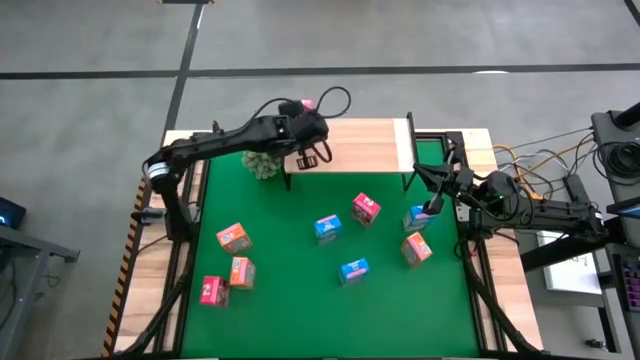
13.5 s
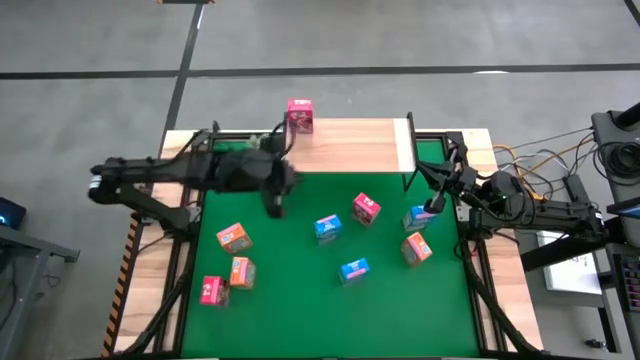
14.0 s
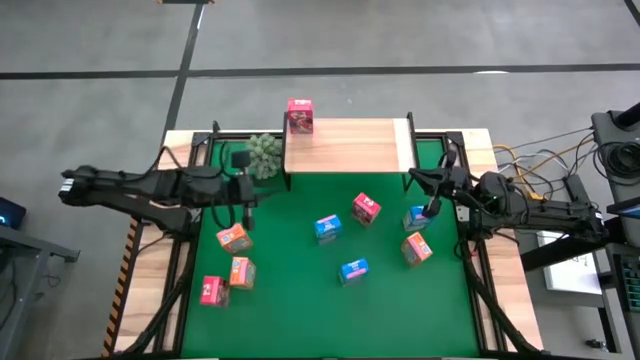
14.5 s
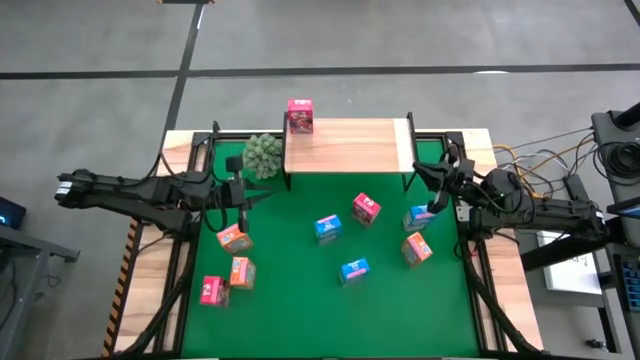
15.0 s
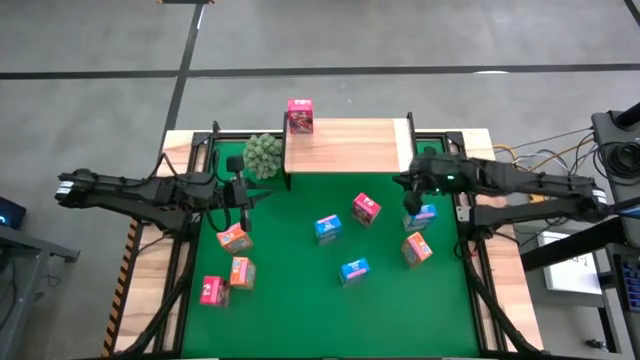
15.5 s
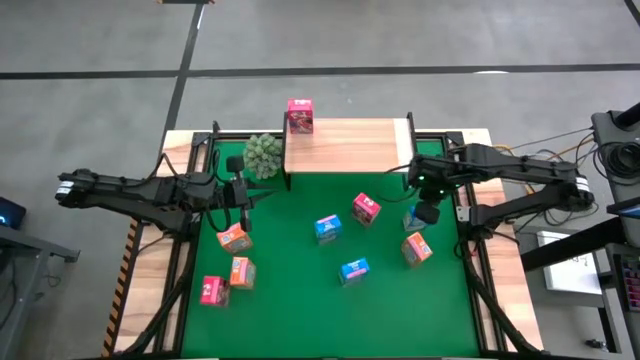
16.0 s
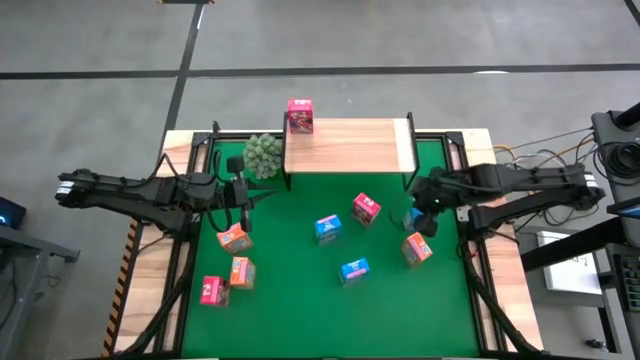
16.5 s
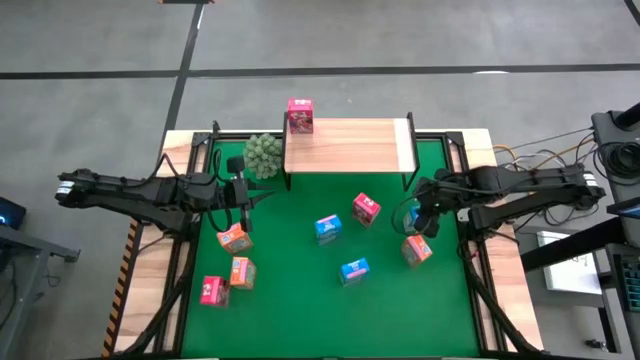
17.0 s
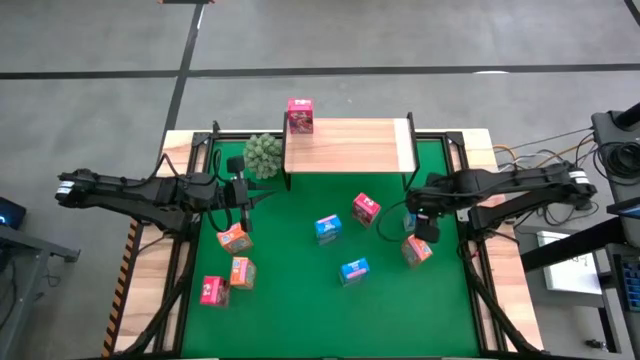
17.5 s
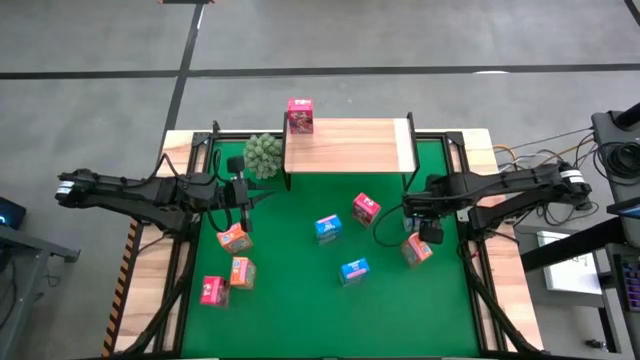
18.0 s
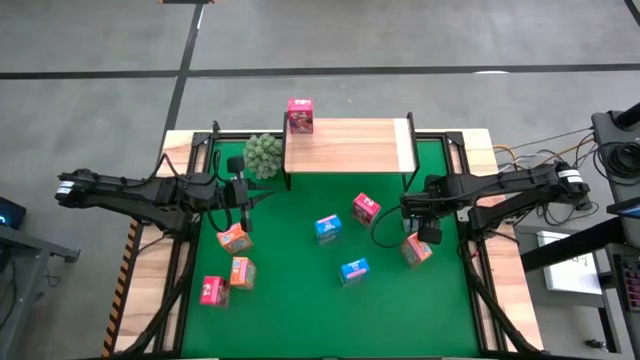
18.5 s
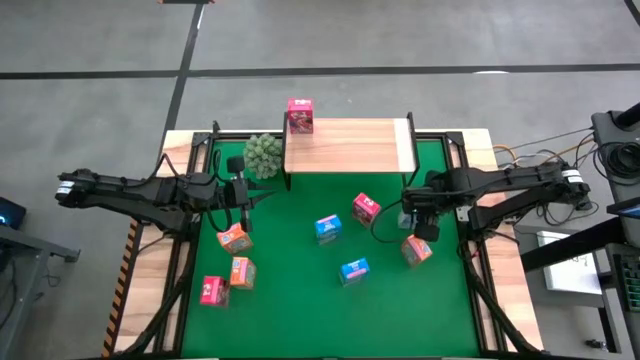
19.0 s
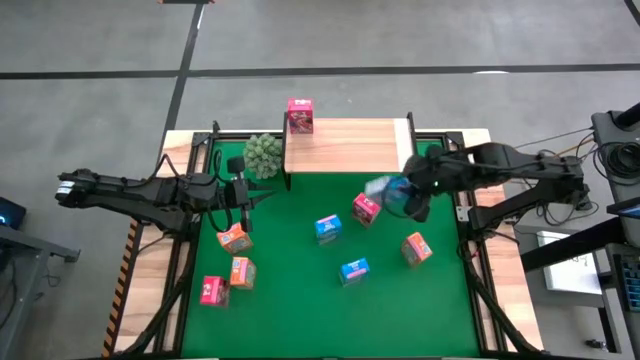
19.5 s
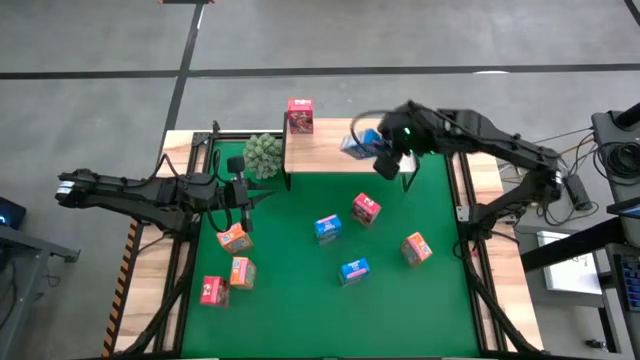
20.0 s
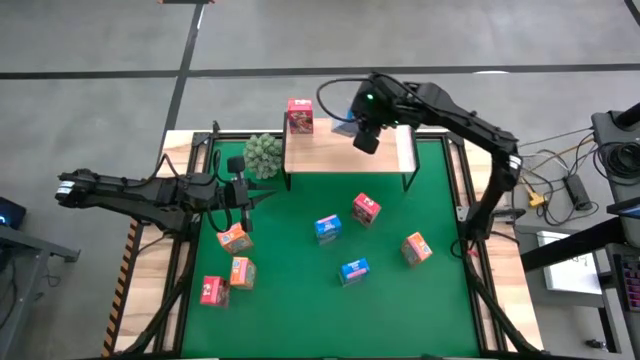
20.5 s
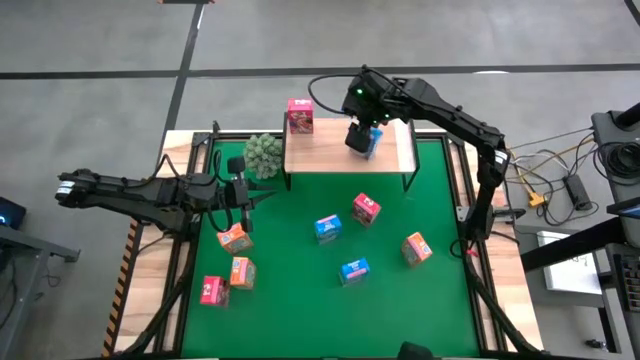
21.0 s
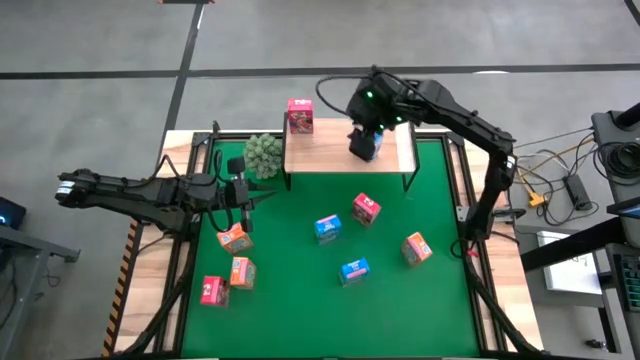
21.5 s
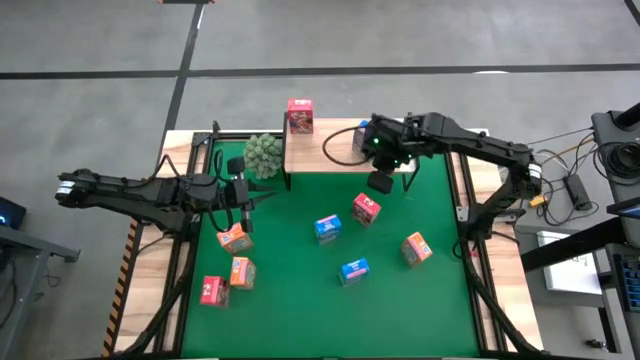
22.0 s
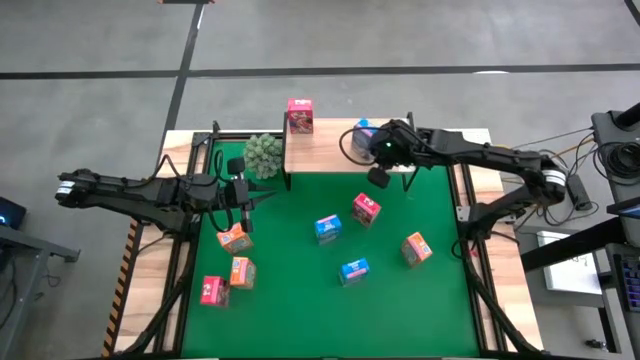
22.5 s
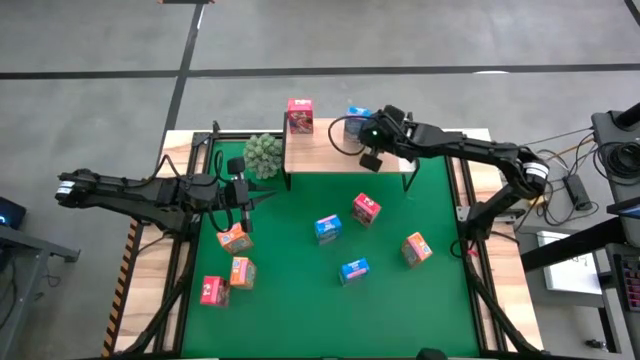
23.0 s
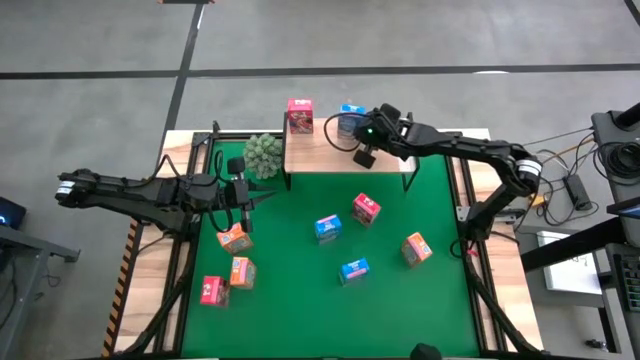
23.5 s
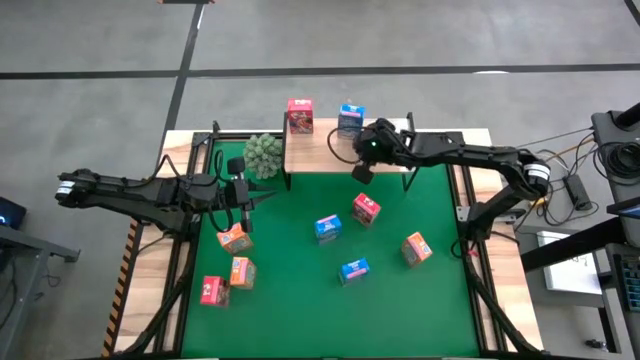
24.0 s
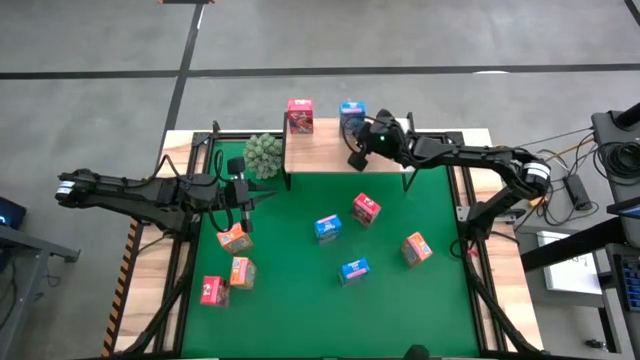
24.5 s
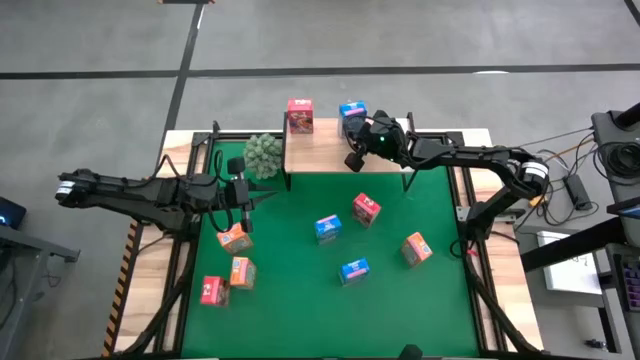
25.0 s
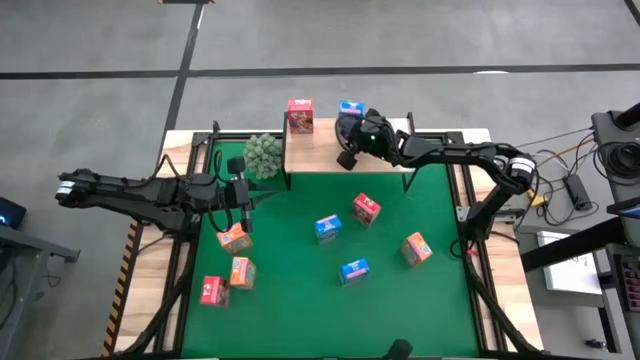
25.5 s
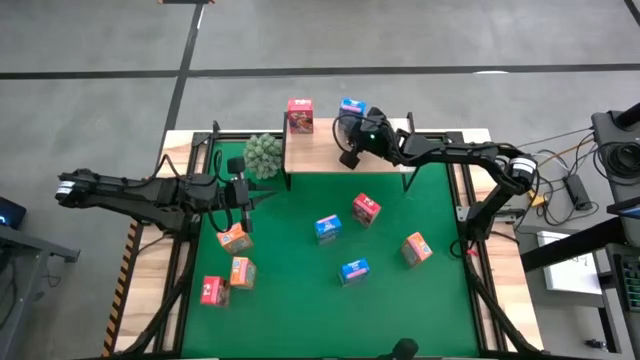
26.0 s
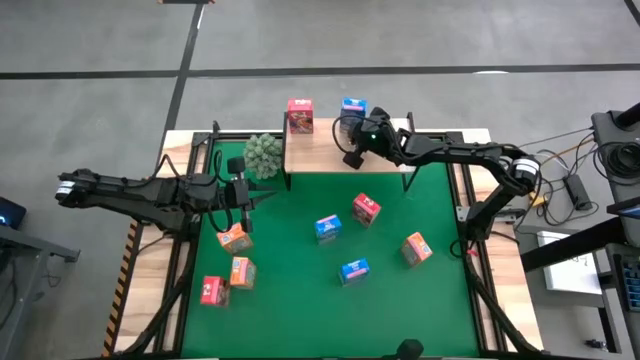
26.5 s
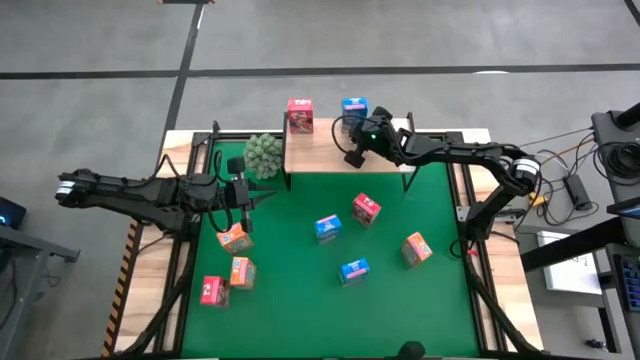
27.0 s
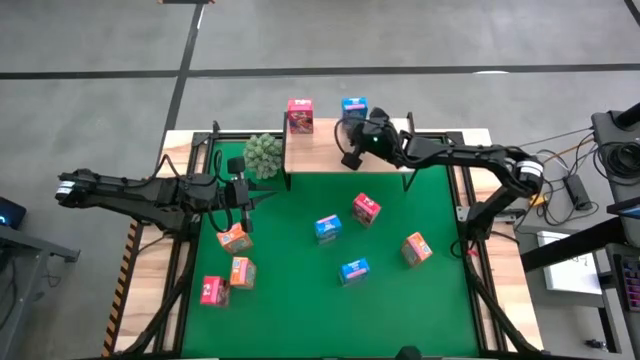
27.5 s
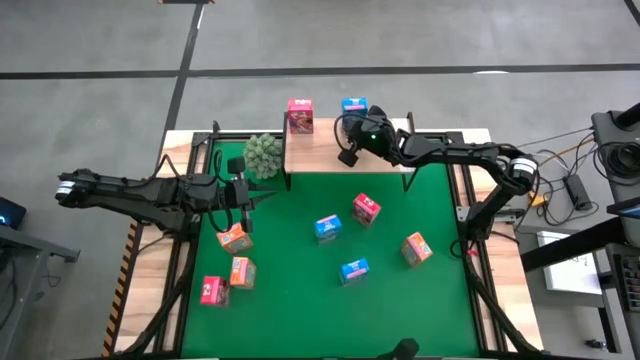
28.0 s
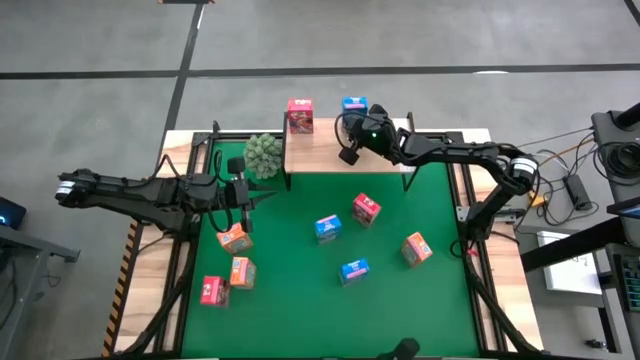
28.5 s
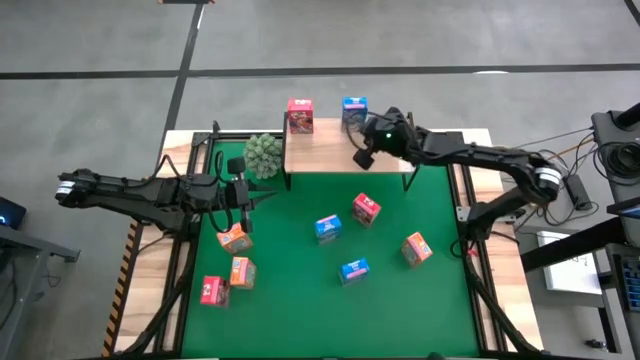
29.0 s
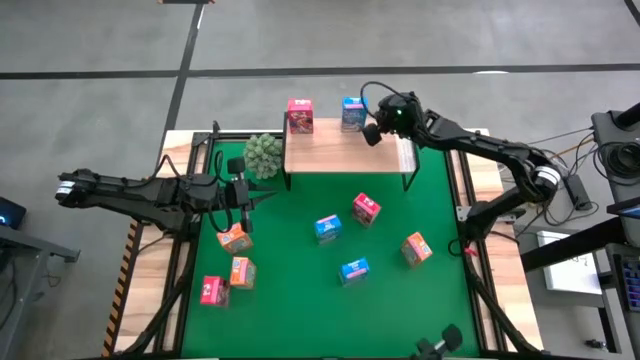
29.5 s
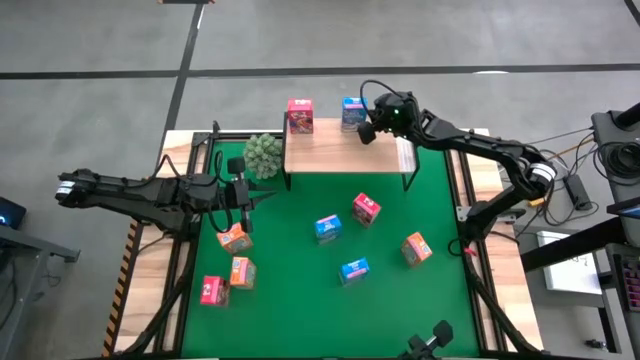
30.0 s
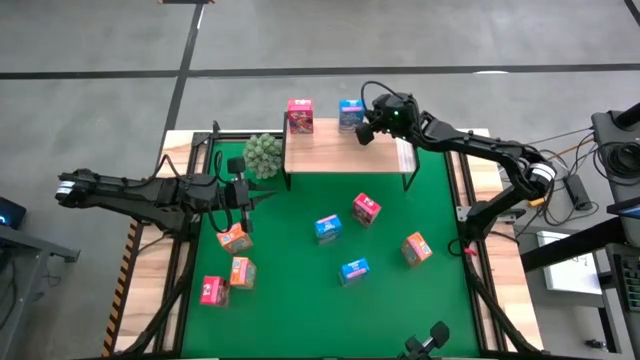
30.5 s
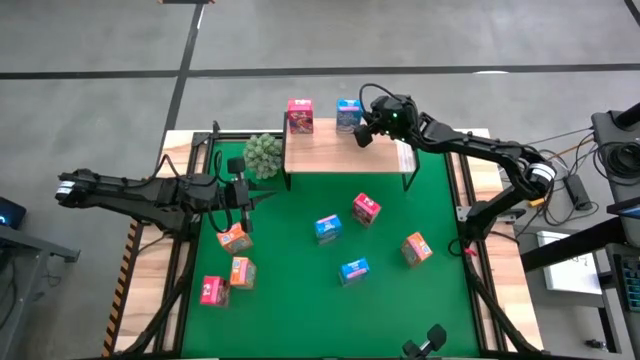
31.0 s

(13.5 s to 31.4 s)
Task: Stack cereal on shelf
Put the top right blue cereal box on the shelf

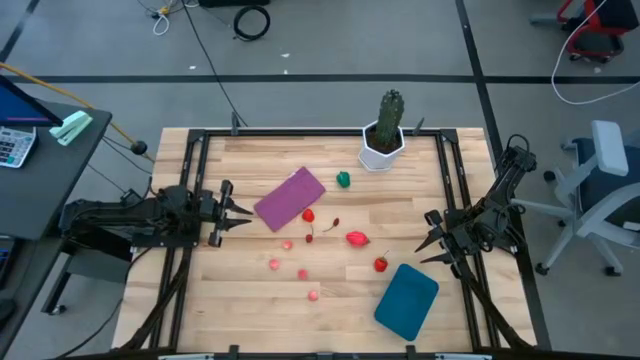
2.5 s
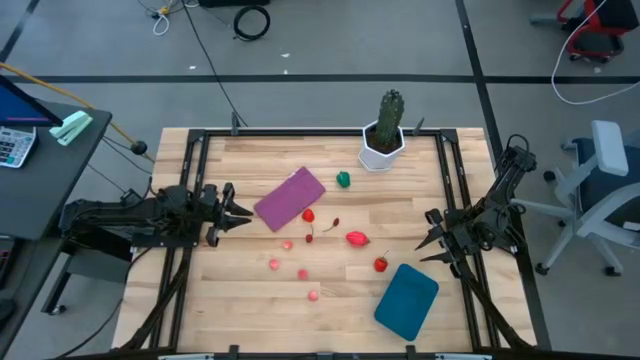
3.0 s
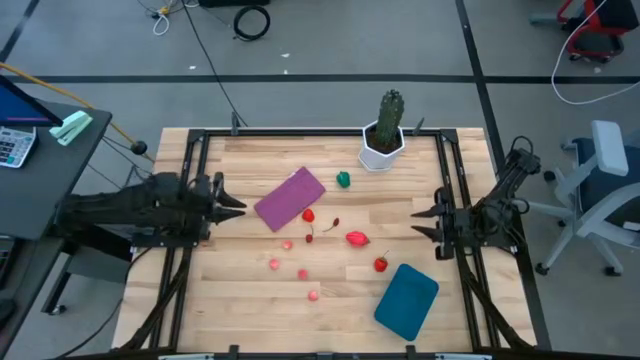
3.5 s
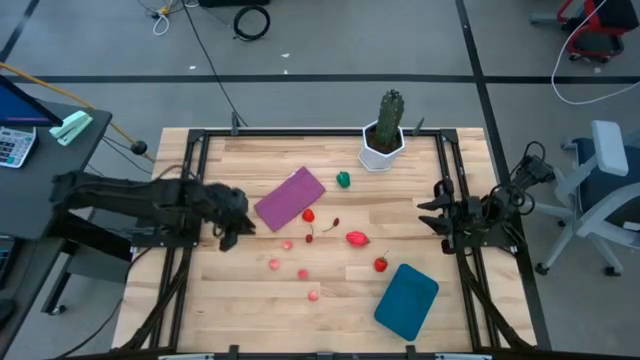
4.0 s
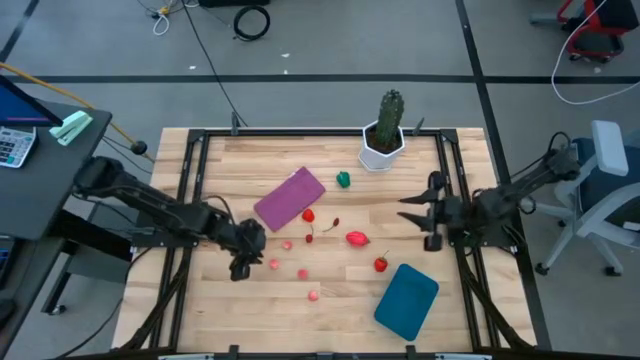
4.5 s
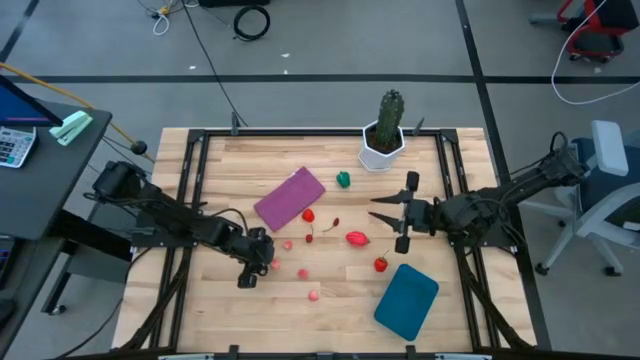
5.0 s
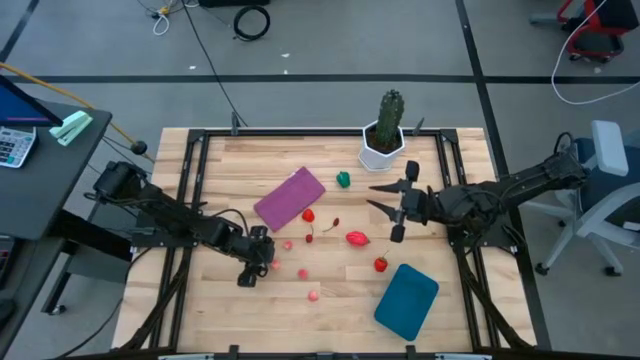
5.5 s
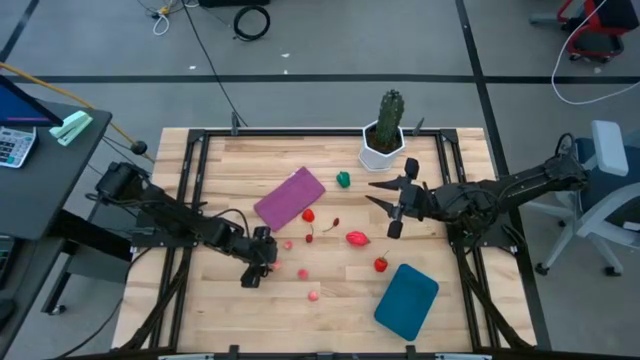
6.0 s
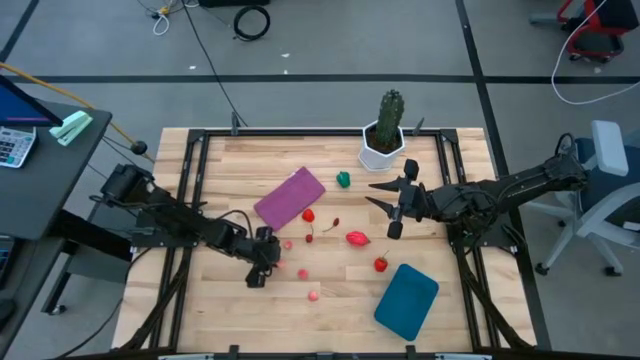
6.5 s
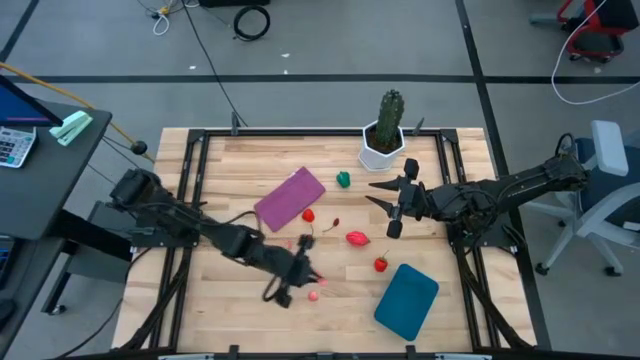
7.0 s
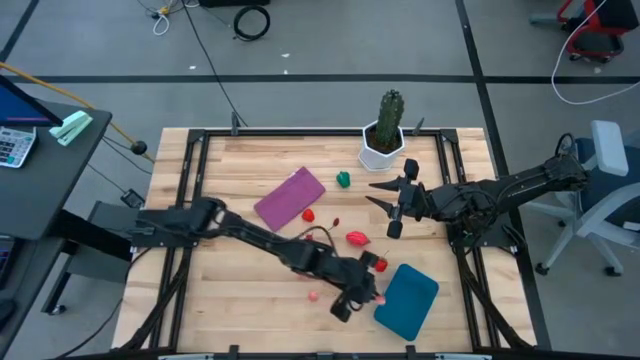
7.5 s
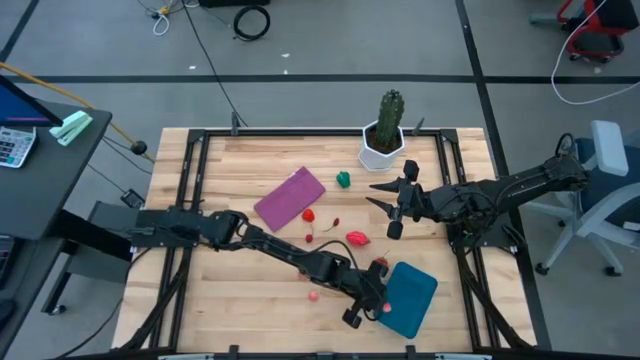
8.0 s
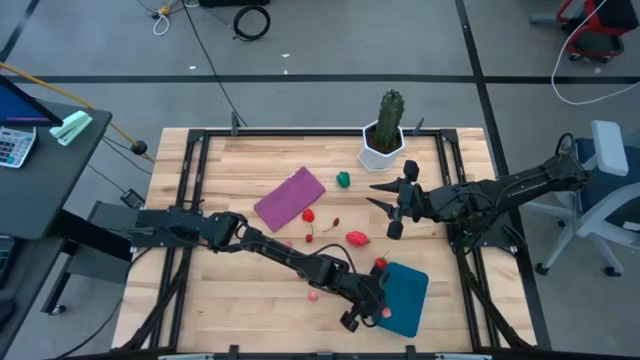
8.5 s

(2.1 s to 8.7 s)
Task: Pick and placing Produce into tupperware
Put the peach into the blue bin
